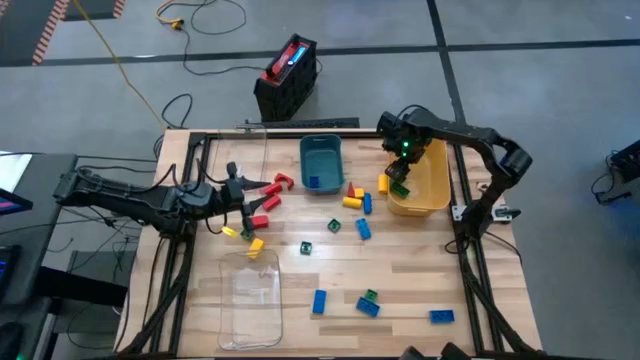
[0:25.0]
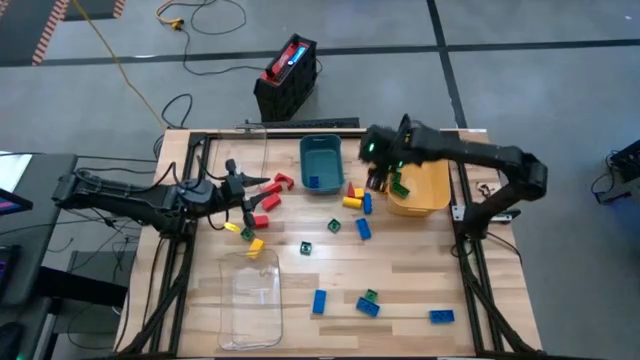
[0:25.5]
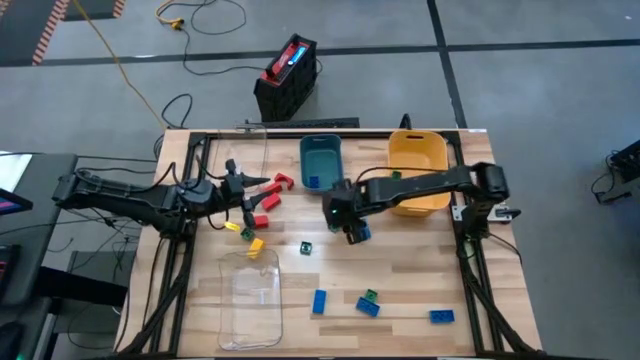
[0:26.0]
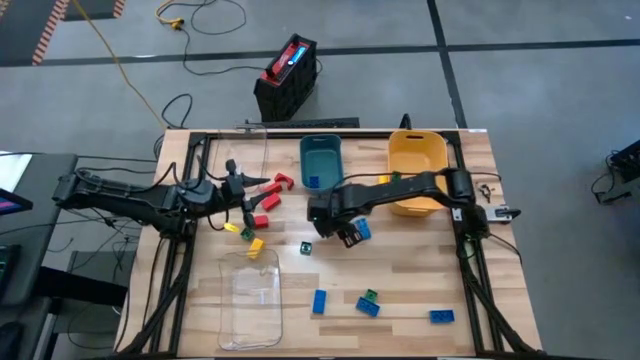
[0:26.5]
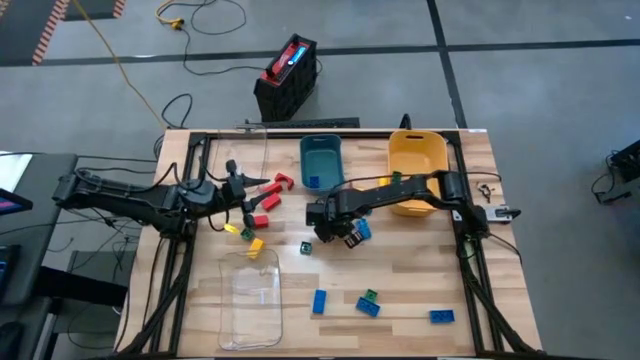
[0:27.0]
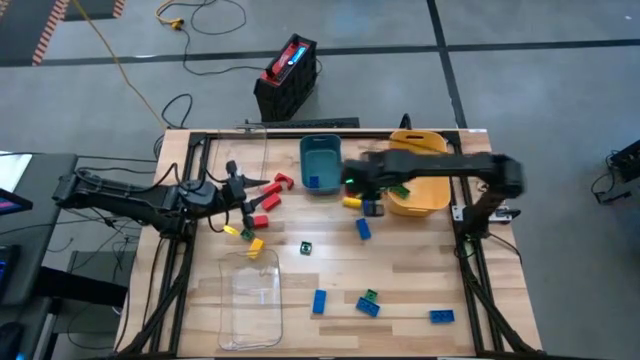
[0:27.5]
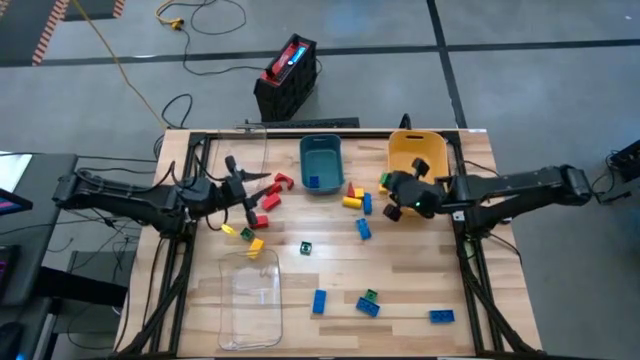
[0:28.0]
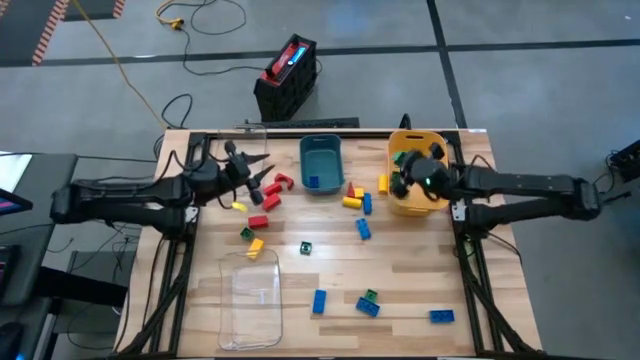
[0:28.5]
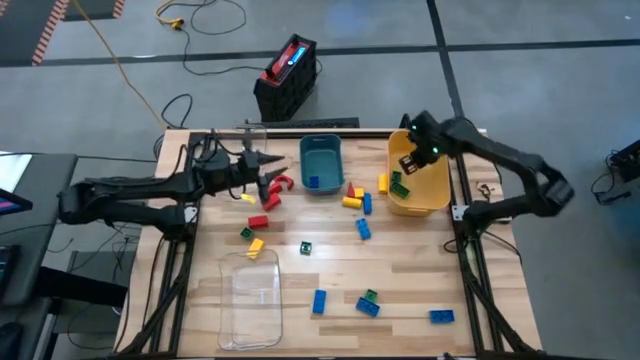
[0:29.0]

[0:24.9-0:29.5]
Task: Sort blocks
Put the green game piece into the yellow bin

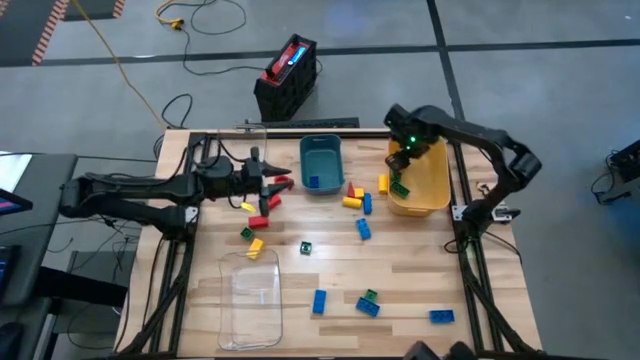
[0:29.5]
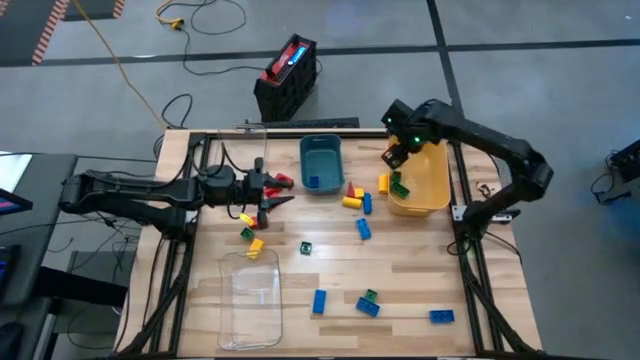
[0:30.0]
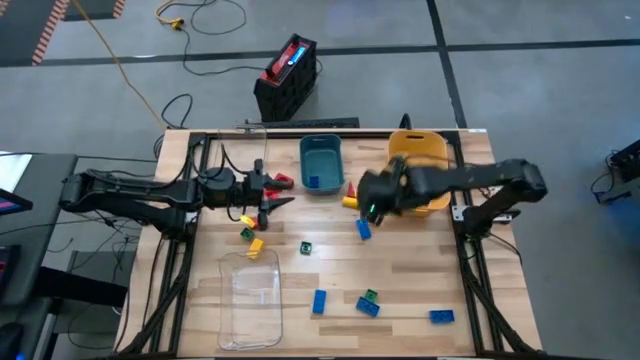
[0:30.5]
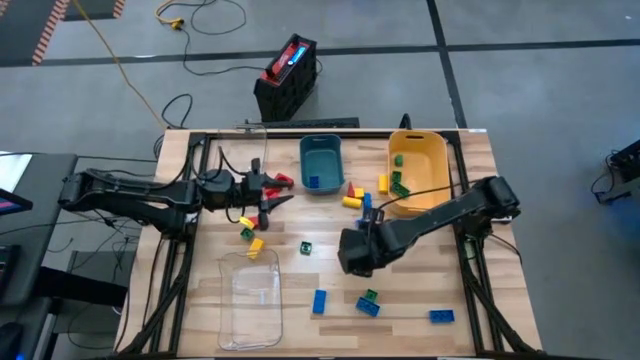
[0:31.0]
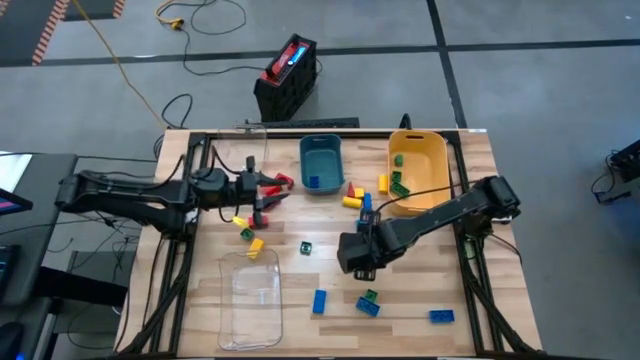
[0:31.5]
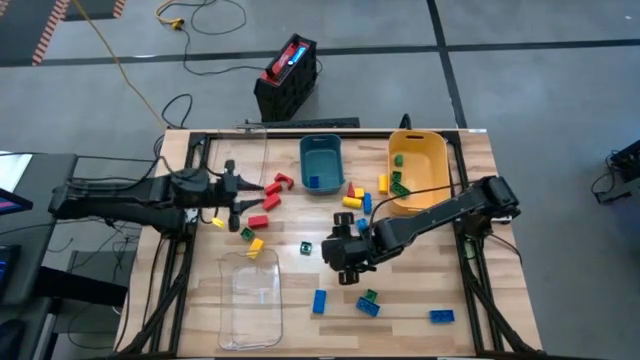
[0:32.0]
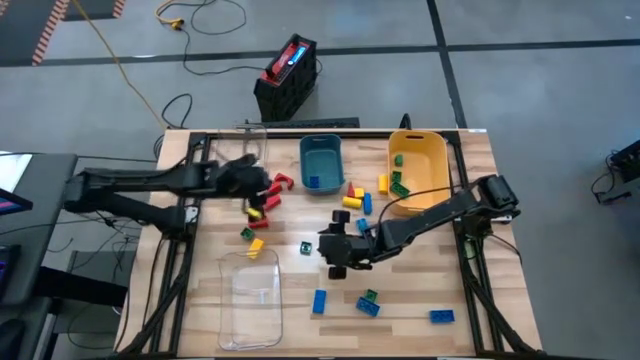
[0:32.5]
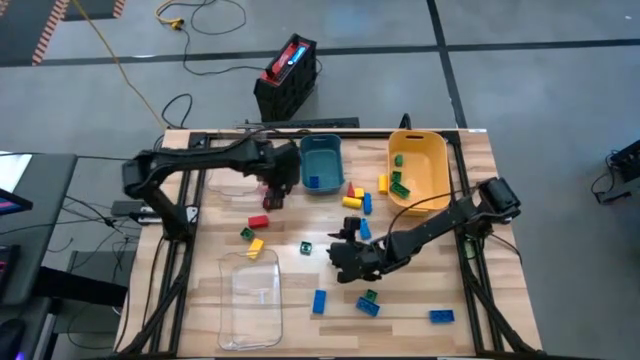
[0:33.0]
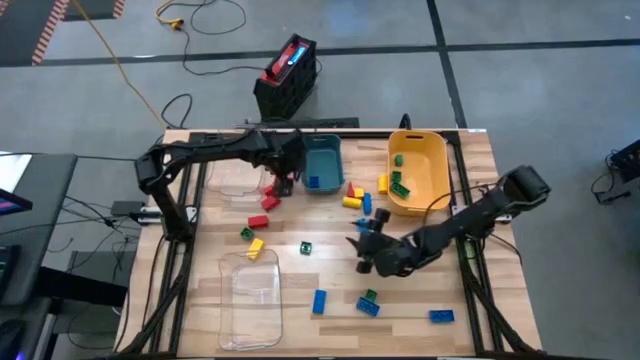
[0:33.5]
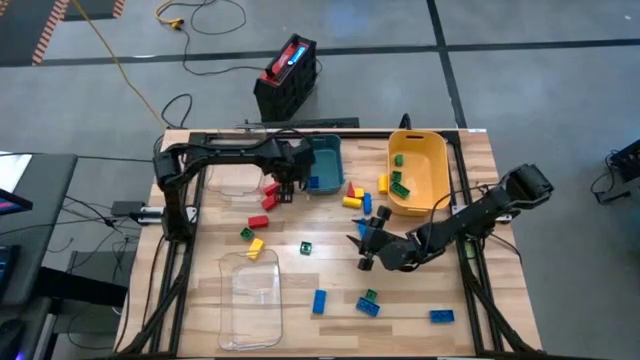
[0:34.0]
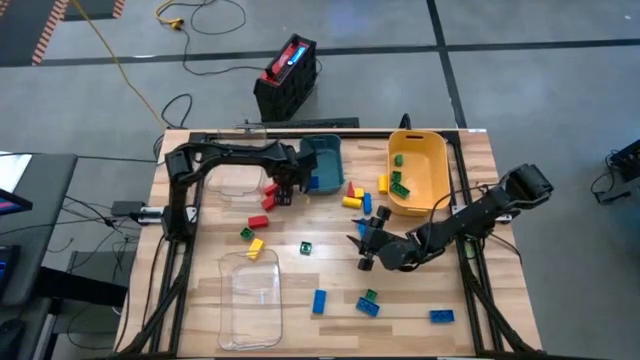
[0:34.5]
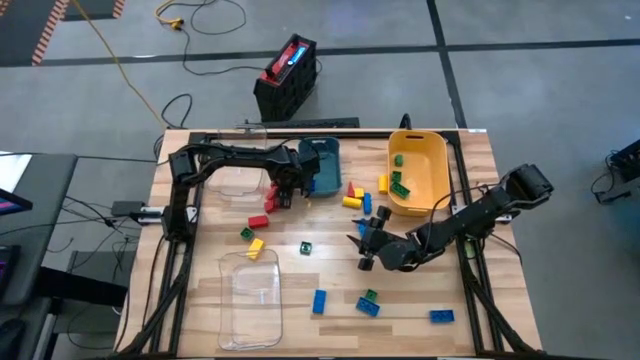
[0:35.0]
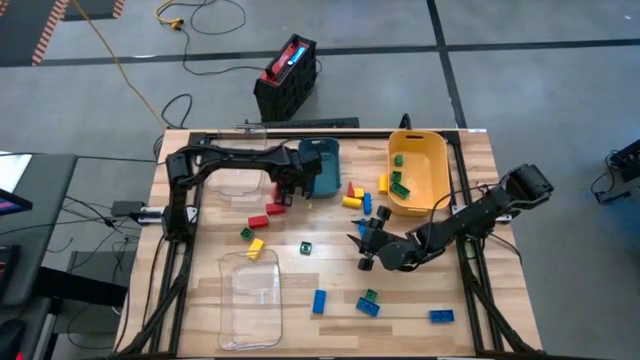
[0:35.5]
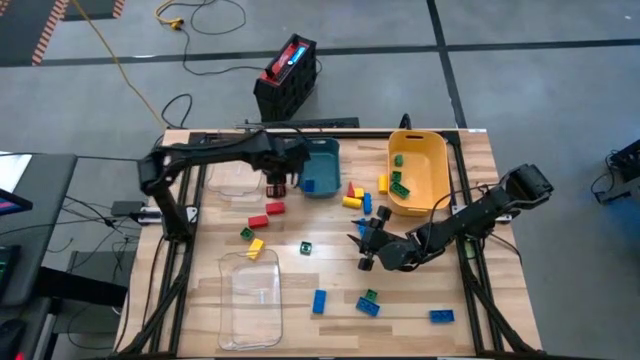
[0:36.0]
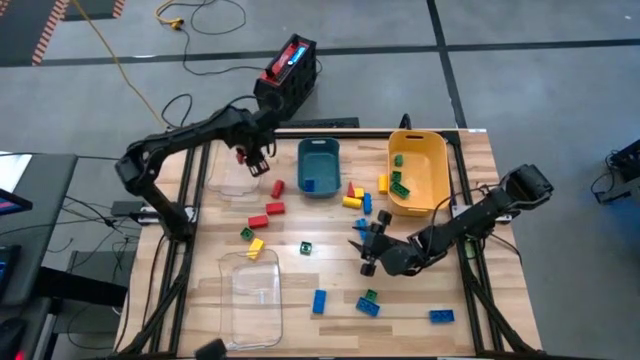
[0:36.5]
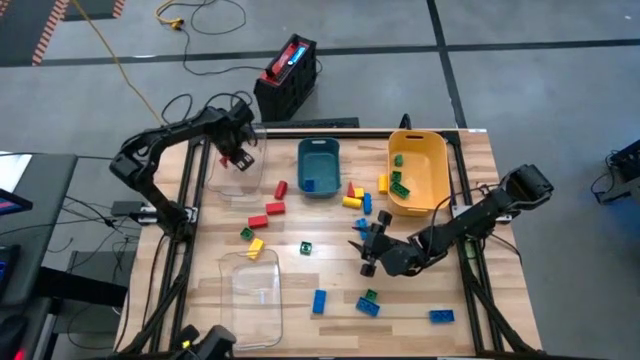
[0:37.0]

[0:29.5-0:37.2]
Put the red block into the top transparent bin

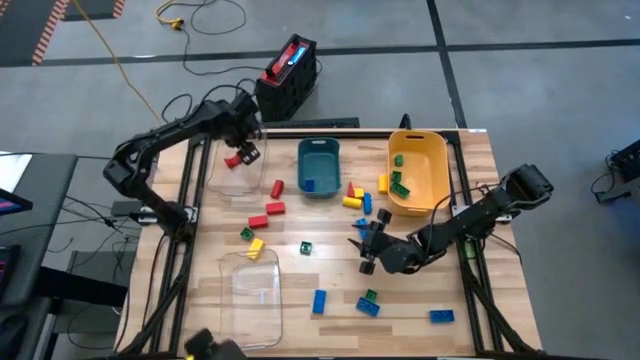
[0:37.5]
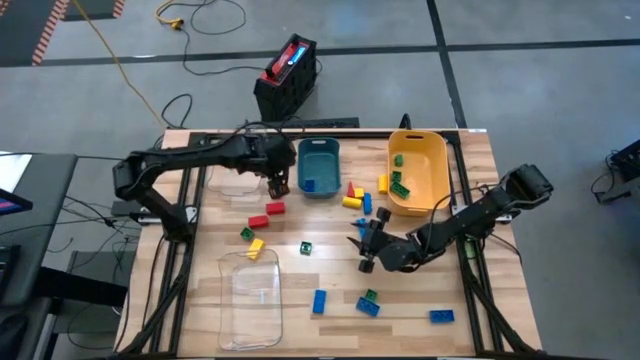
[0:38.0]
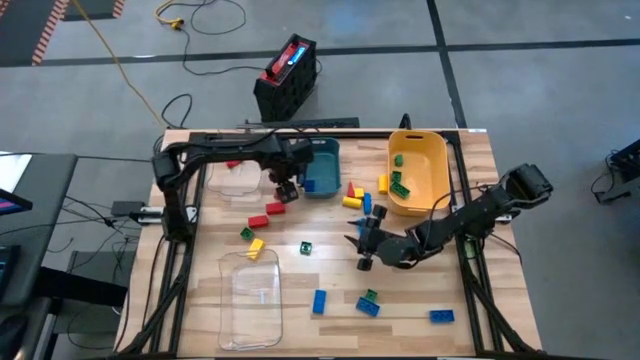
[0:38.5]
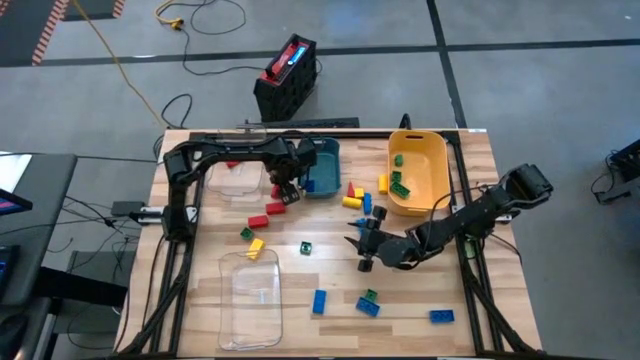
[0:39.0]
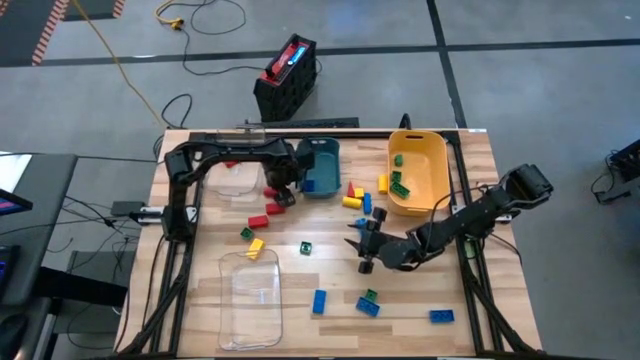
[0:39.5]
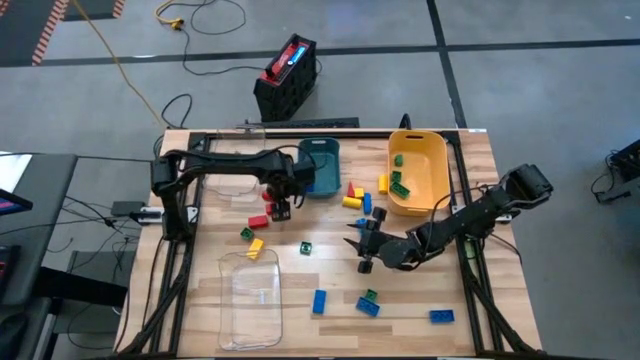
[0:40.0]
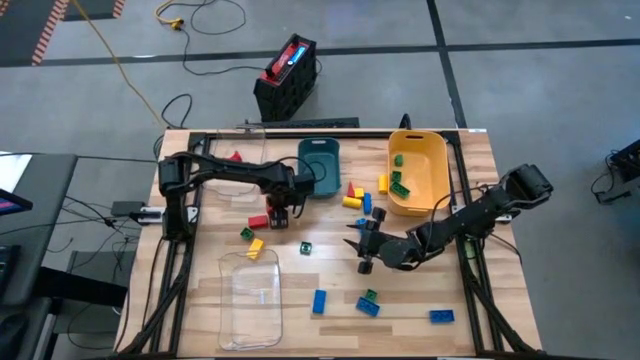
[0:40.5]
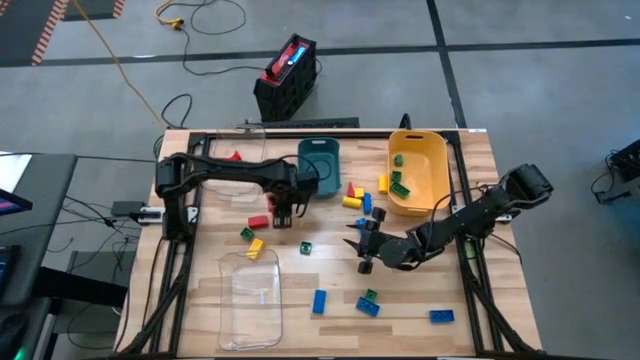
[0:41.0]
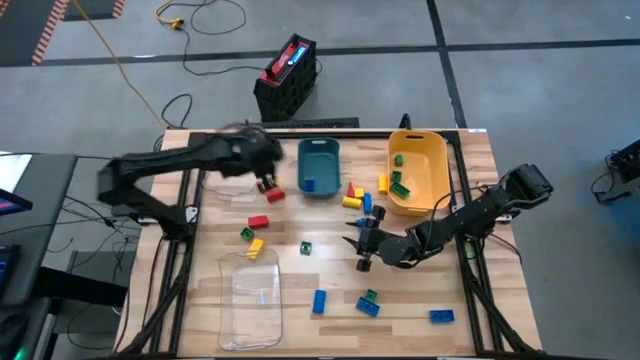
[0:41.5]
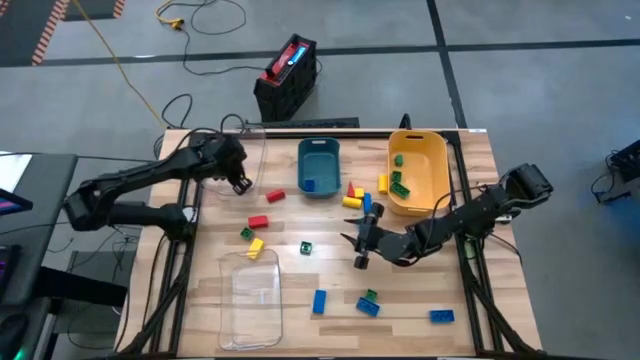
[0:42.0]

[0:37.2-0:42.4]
Put the red block into the top transparent bin

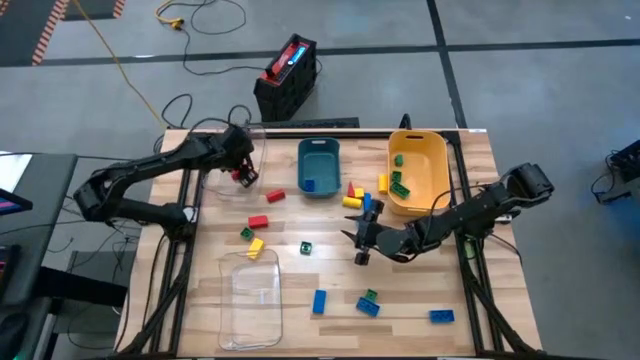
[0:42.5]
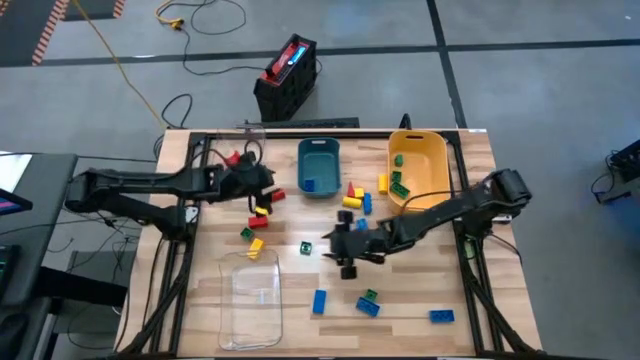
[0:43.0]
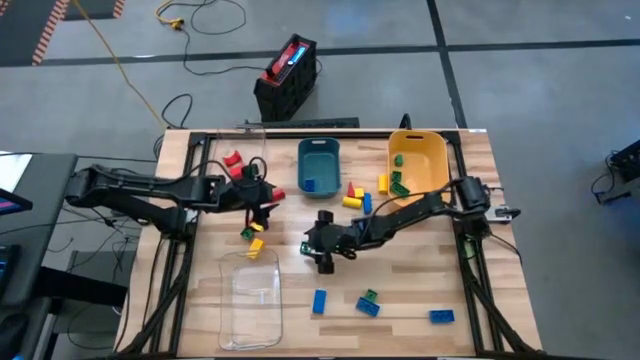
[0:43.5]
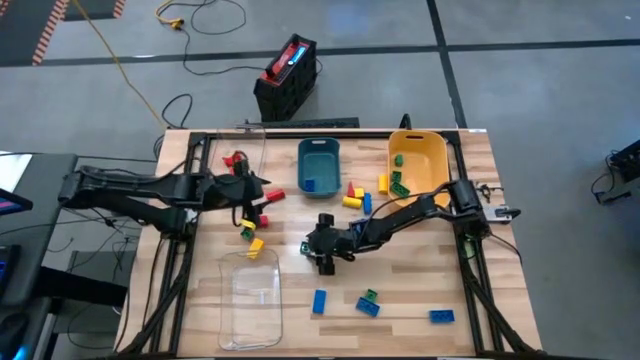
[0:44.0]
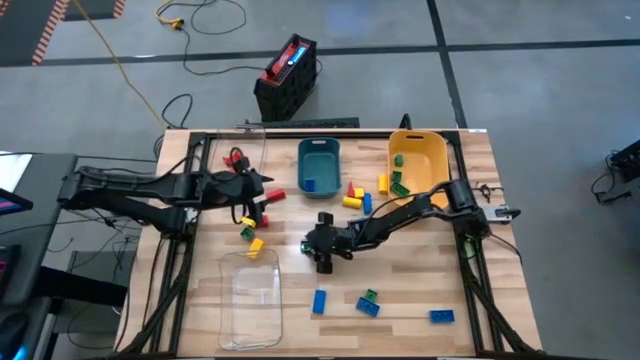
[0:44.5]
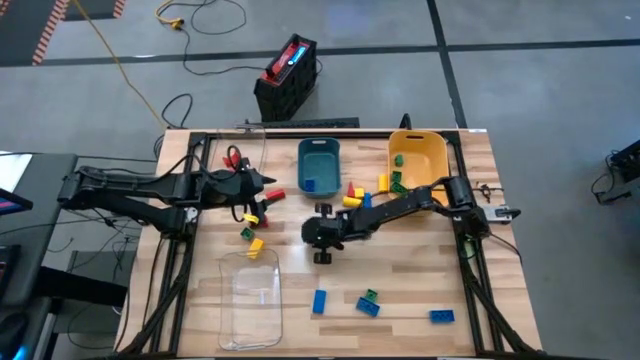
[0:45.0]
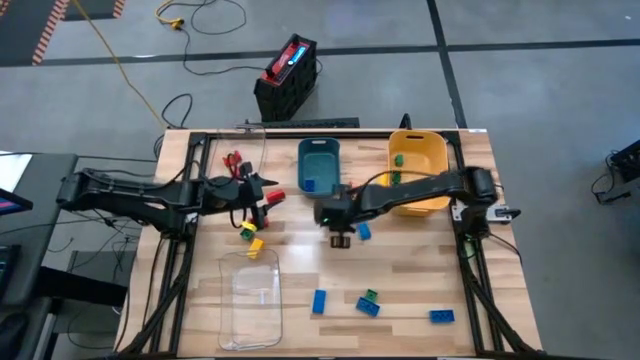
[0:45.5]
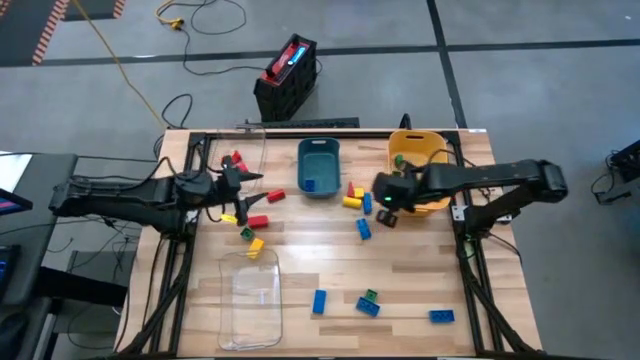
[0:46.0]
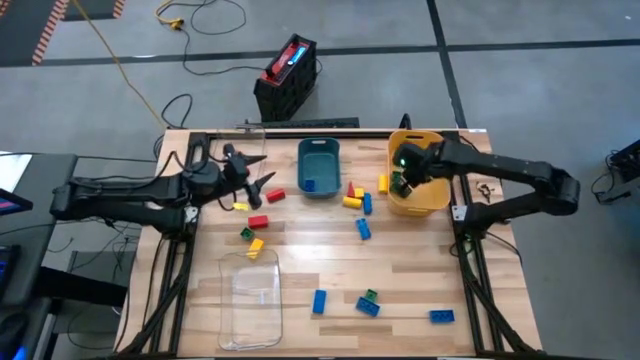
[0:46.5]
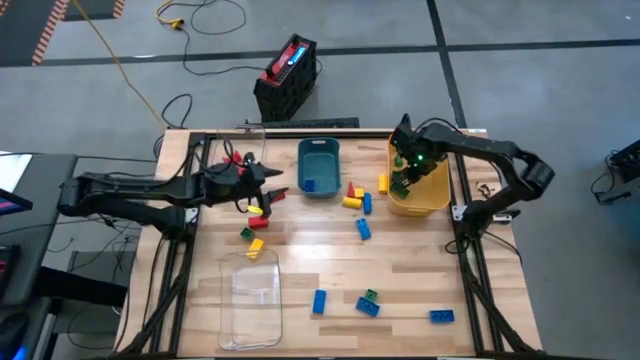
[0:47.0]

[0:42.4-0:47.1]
Put the green game piece into the yellow bin

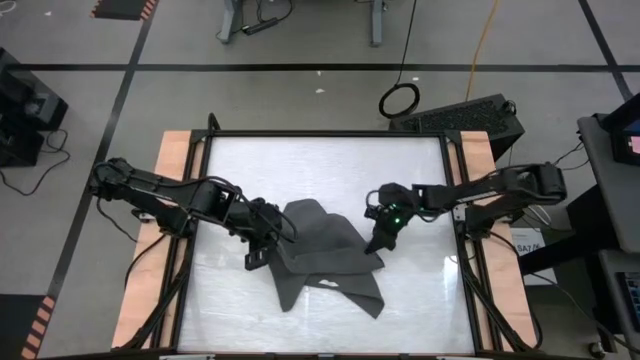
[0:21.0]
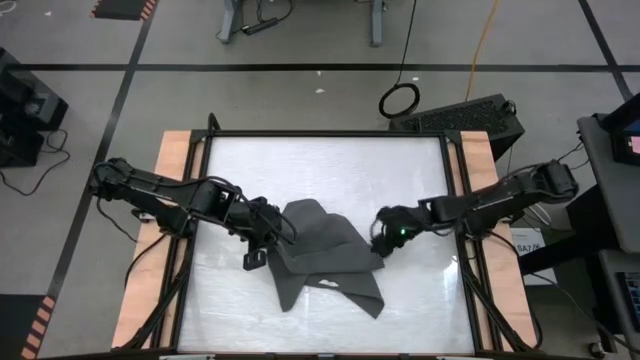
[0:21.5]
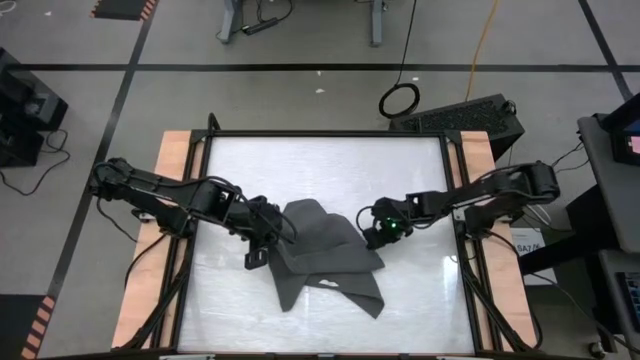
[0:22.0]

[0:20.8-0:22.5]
Task: Roll towel into tight, uniform cylinder
Roll the gray towel
